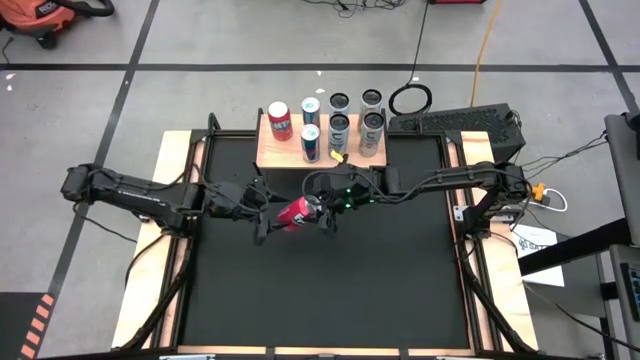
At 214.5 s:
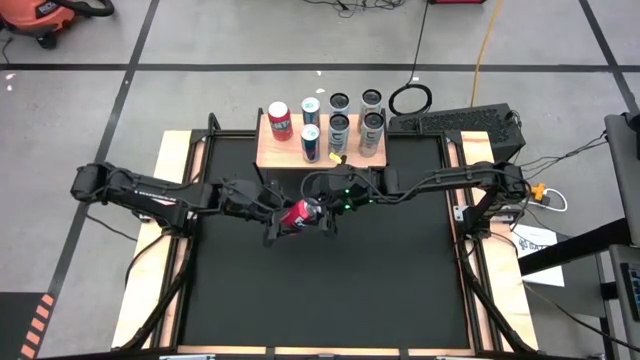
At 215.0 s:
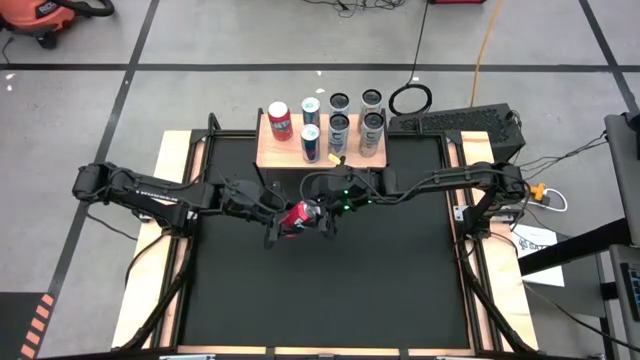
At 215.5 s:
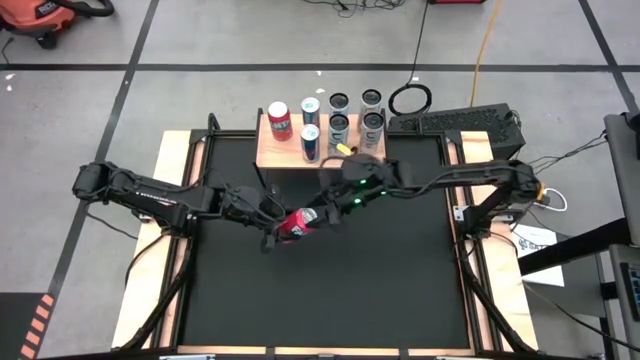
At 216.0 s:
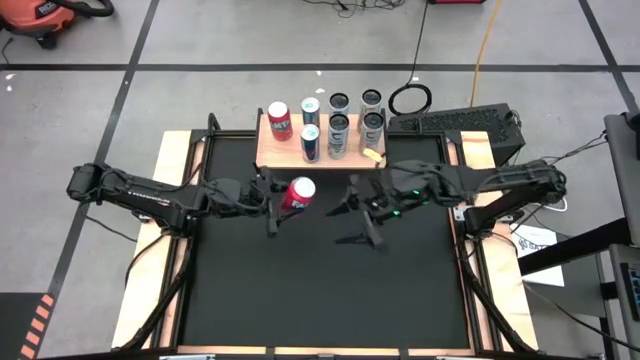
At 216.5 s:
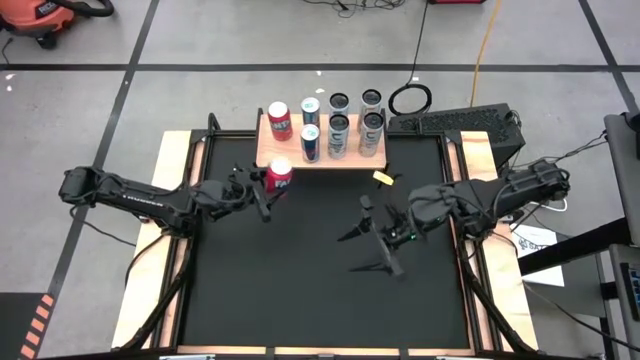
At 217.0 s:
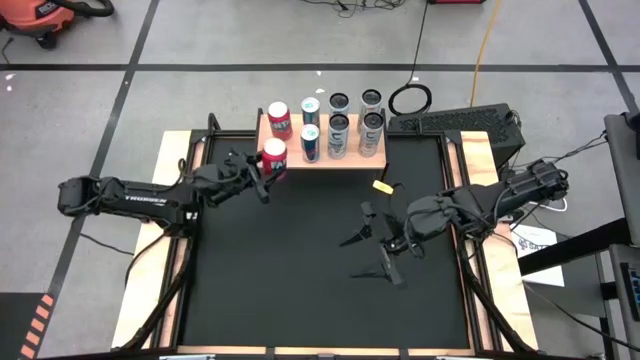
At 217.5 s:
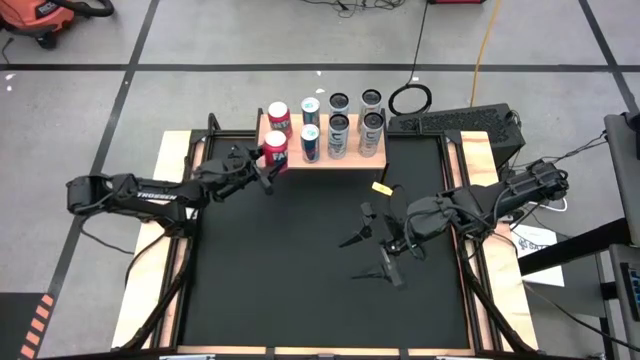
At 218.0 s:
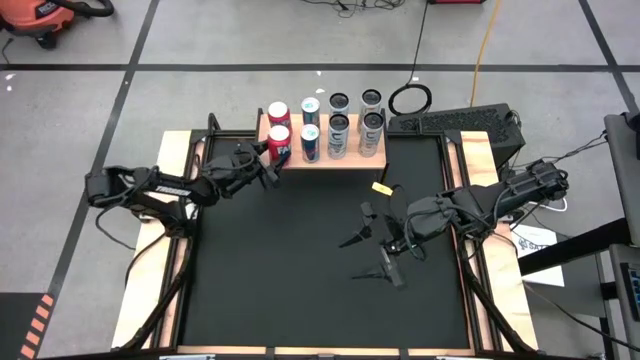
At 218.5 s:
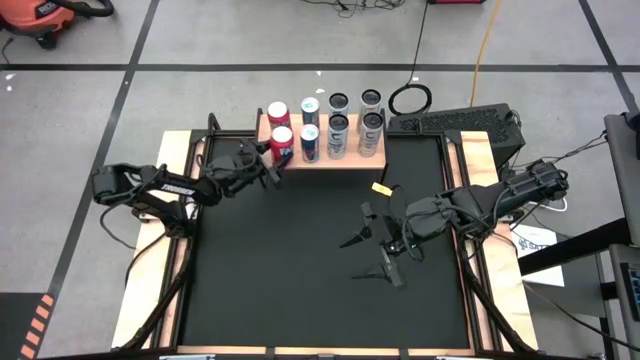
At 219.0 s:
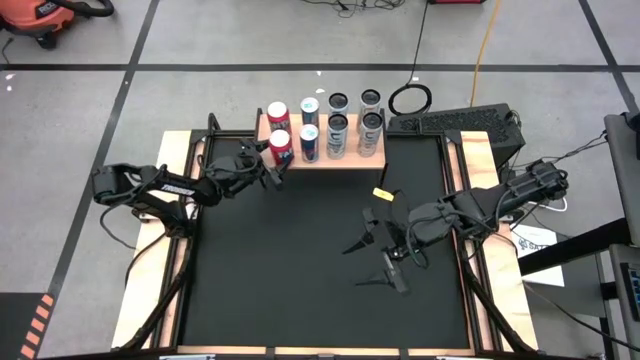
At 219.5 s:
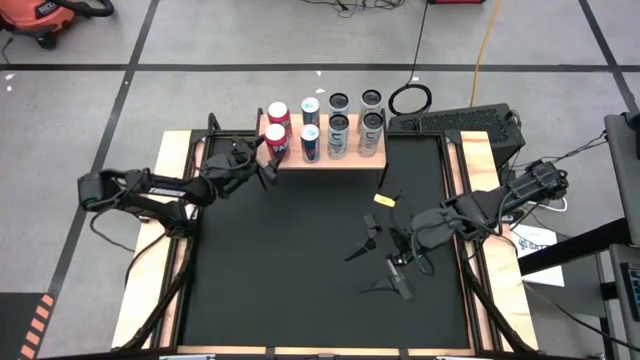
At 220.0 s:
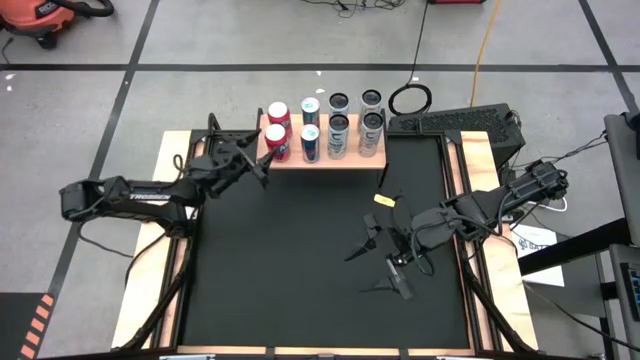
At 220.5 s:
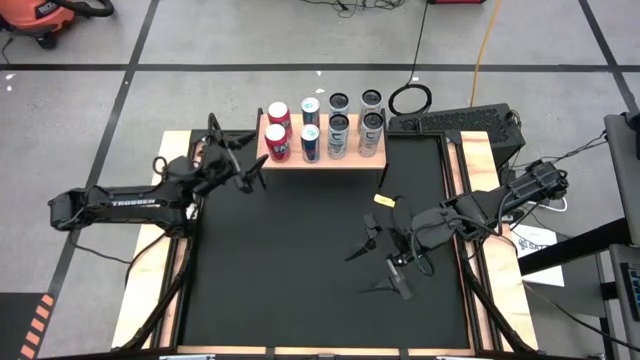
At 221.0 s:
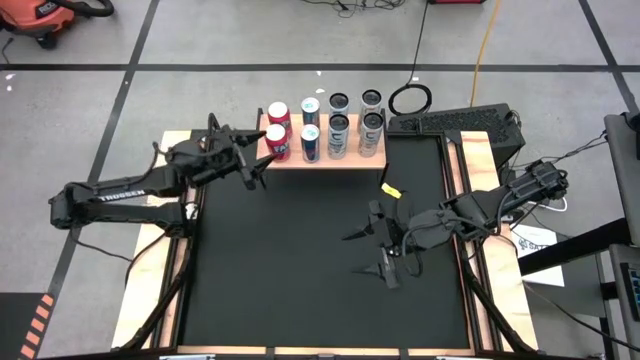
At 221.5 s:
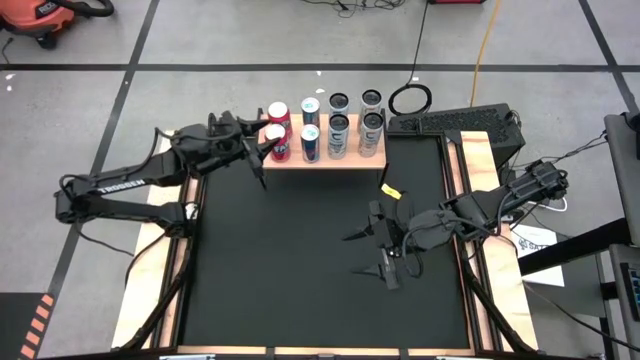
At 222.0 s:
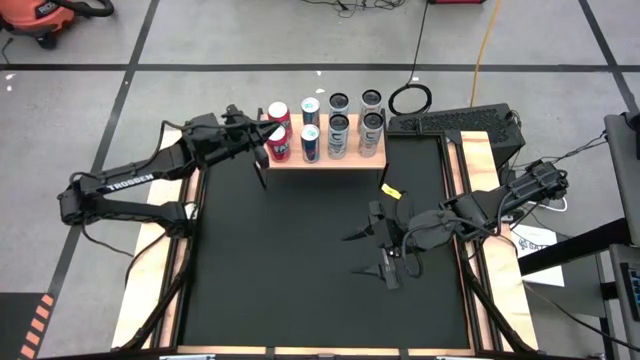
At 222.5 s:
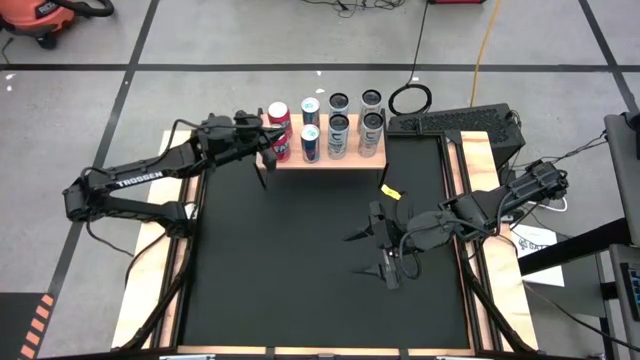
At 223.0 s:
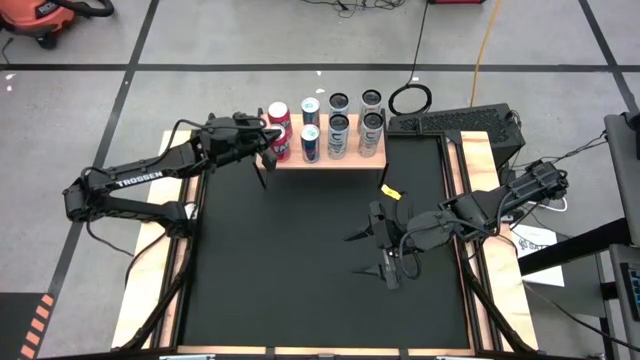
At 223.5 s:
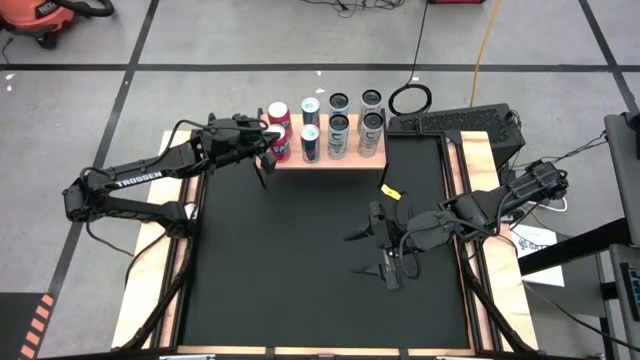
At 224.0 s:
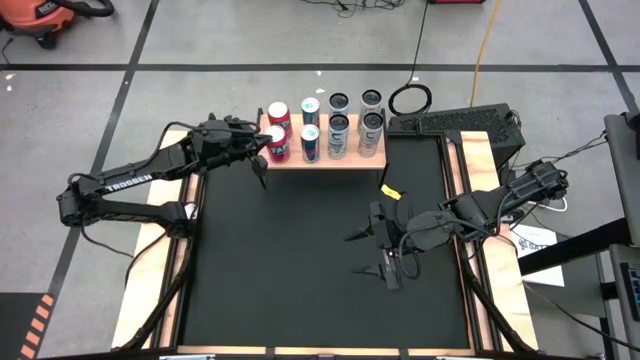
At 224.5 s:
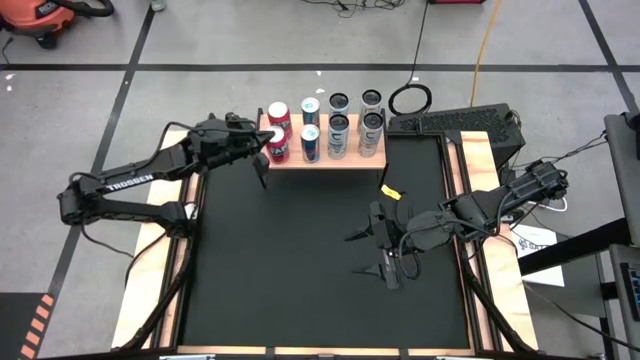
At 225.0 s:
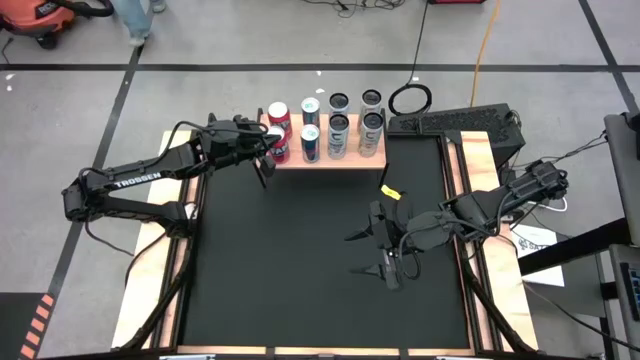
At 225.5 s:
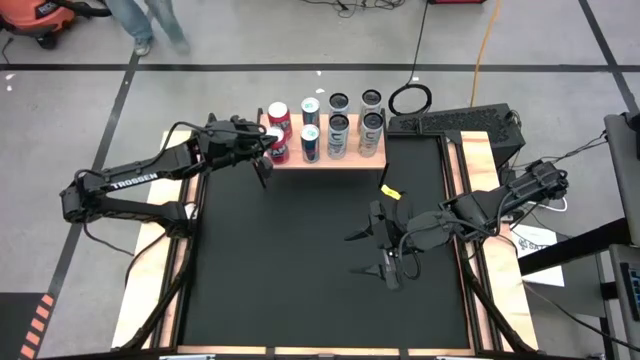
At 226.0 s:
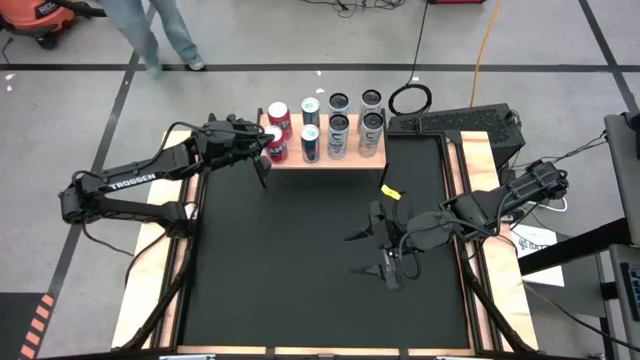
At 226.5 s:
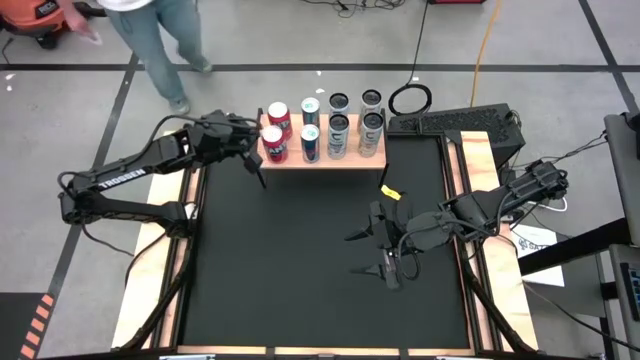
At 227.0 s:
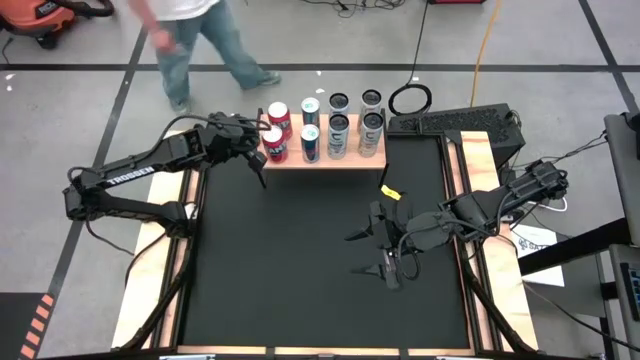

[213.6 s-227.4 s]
Task: Place canned beverage on shelf
Put the red soda can on the shelf aligned with the other red soda can

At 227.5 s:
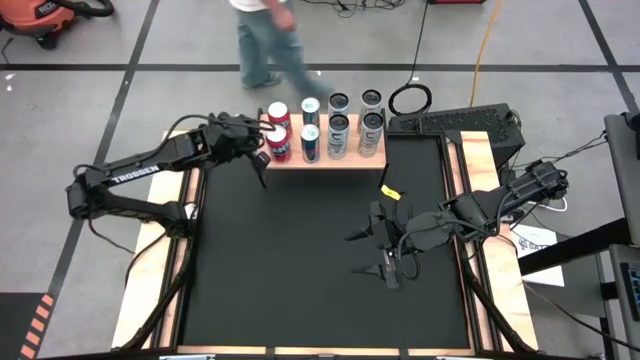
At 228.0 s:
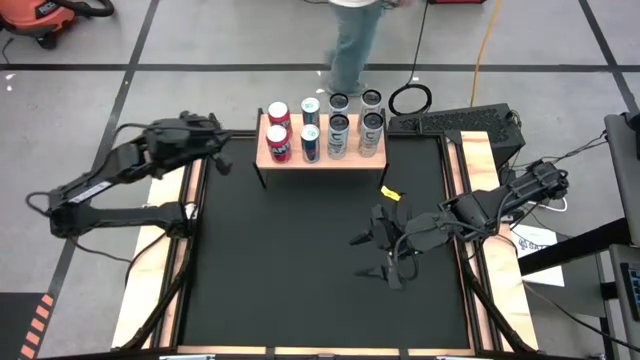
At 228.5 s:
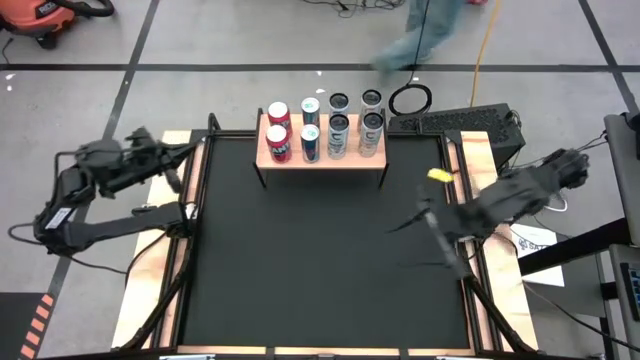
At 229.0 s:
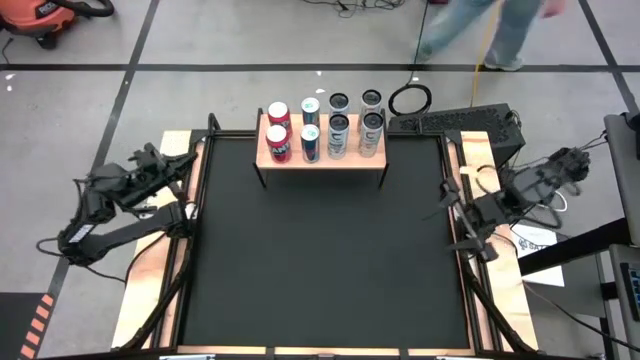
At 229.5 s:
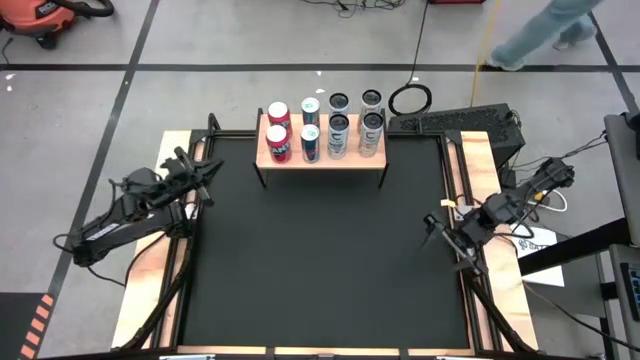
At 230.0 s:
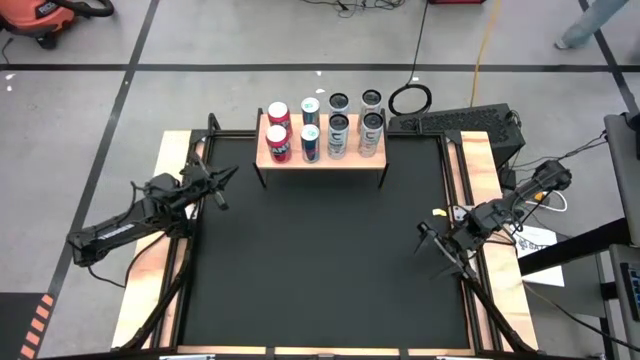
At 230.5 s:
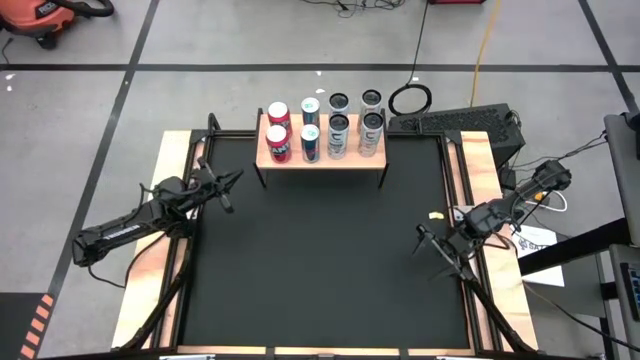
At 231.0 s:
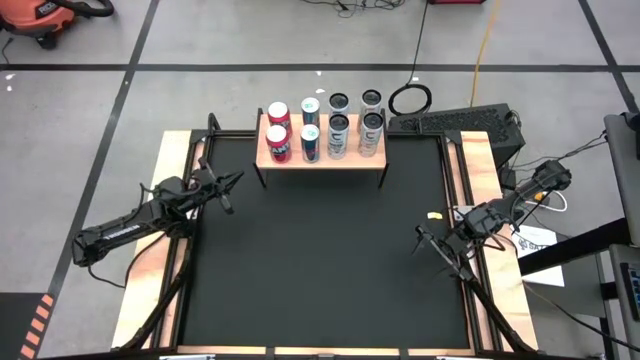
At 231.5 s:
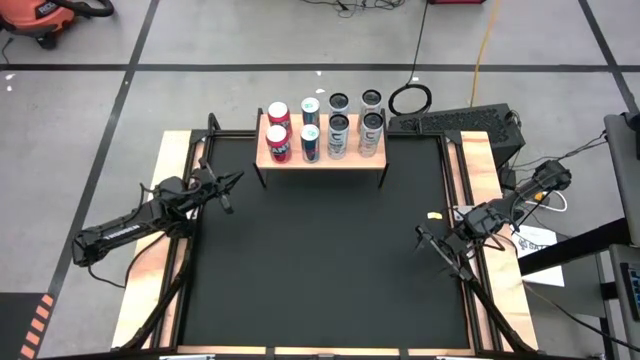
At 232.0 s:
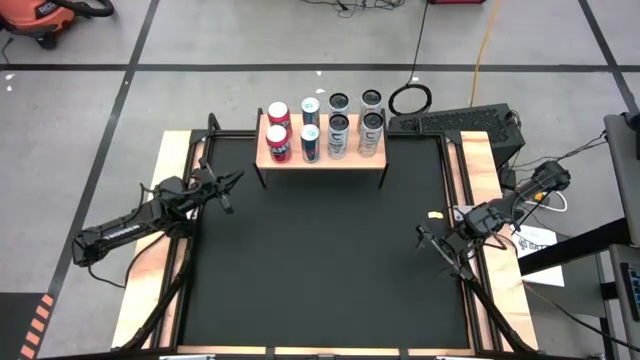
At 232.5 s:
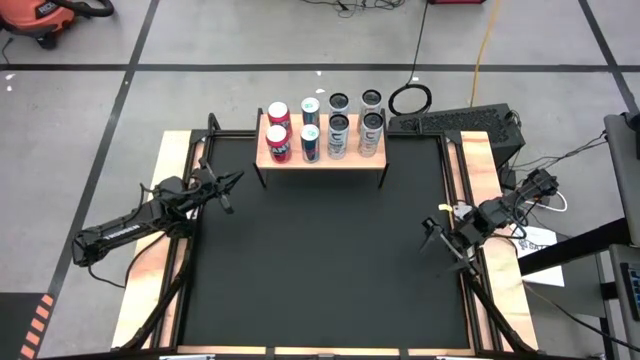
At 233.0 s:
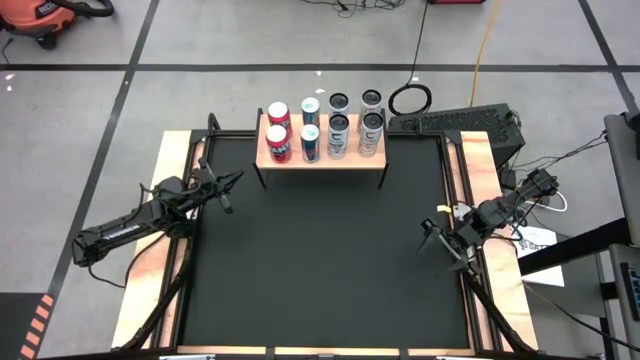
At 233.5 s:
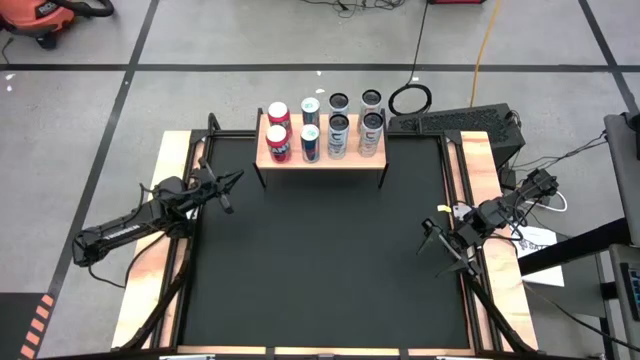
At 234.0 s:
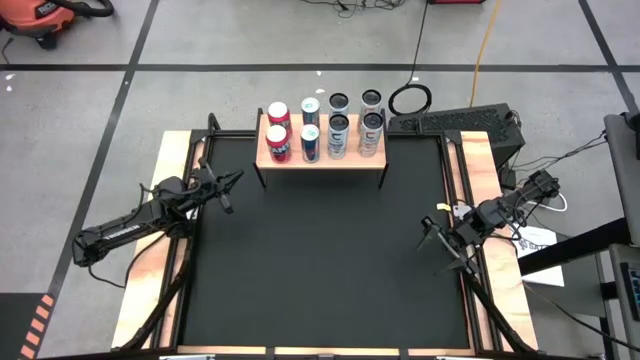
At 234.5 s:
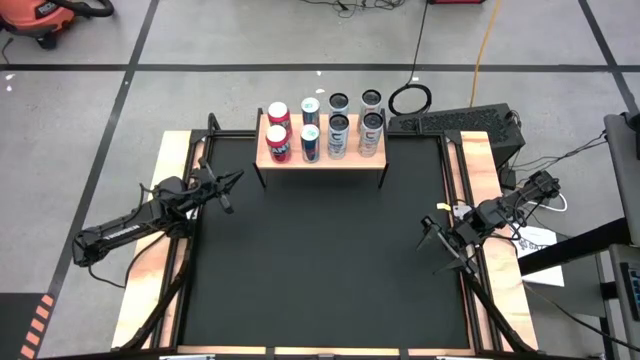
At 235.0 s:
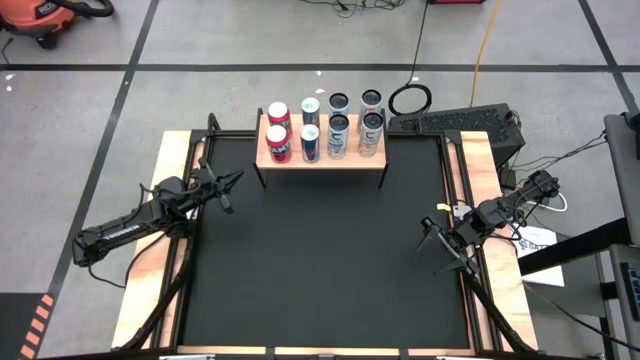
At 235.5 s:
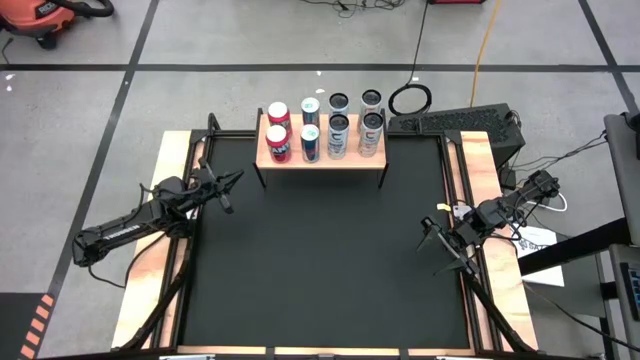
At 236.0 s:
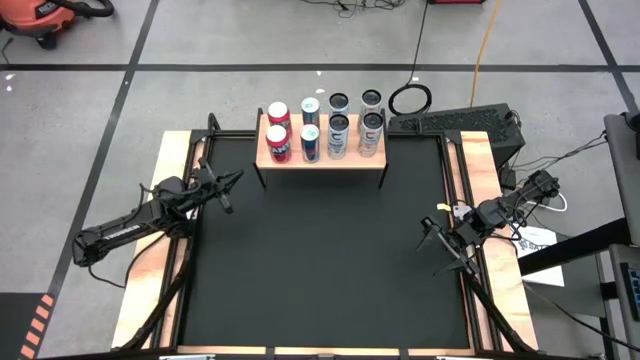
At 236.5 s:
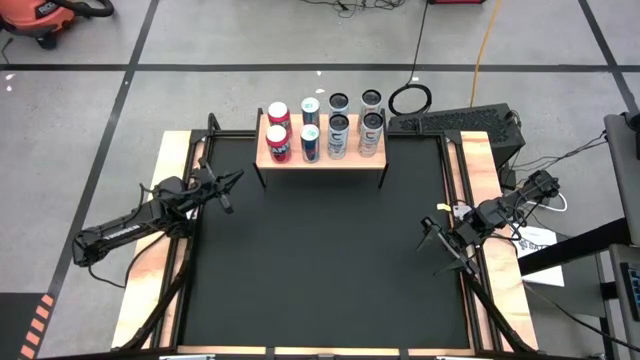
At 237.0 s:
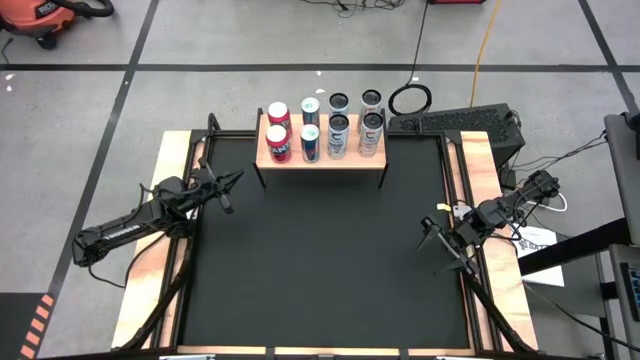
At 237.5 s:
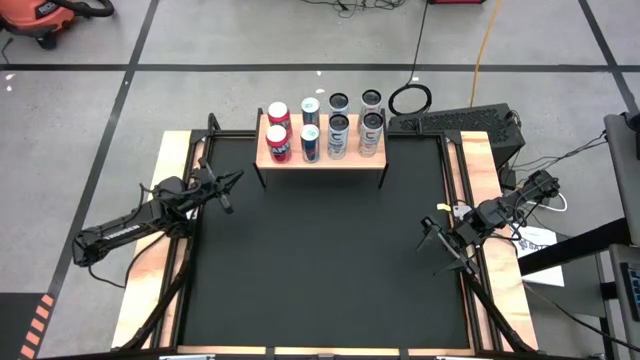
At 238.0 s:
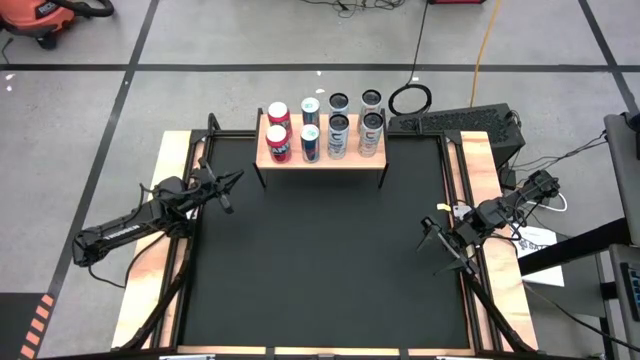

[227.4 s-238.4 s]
Return to Home Position
